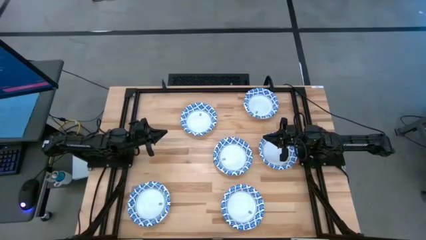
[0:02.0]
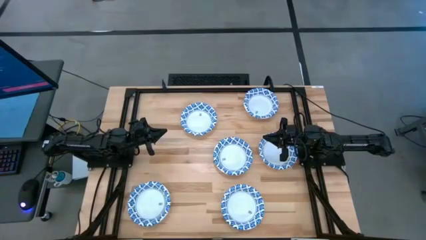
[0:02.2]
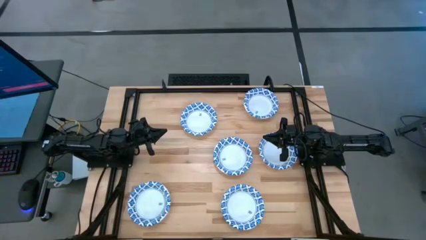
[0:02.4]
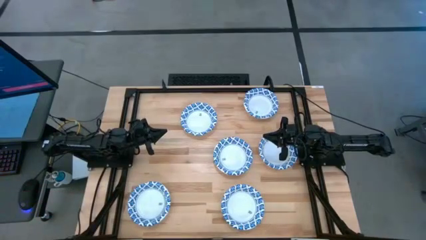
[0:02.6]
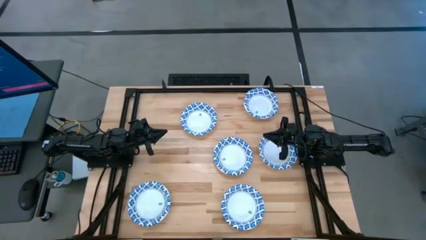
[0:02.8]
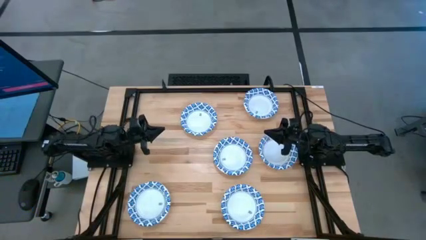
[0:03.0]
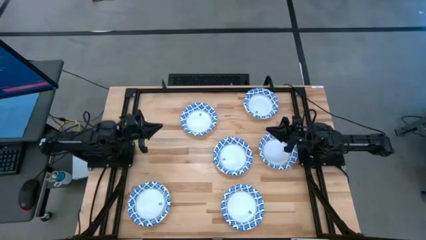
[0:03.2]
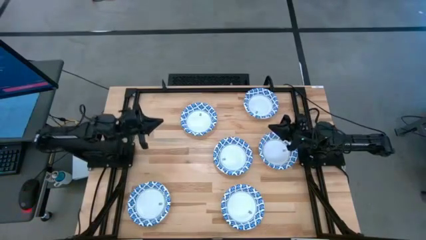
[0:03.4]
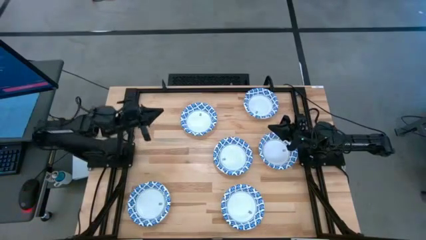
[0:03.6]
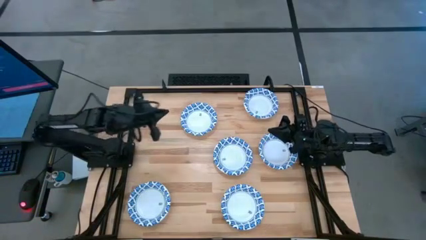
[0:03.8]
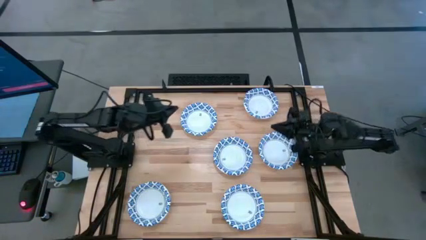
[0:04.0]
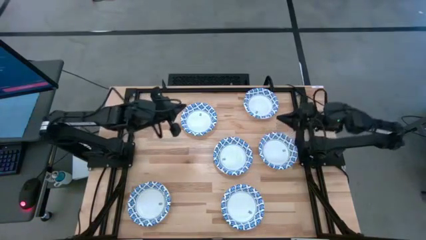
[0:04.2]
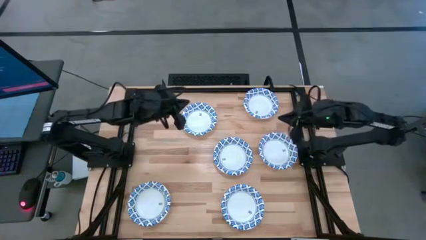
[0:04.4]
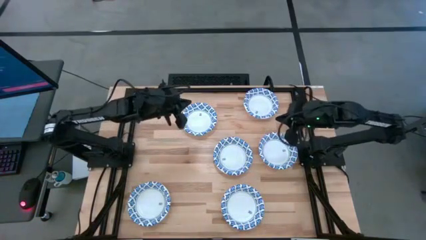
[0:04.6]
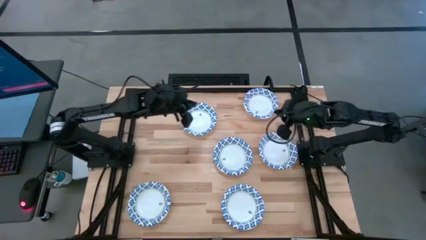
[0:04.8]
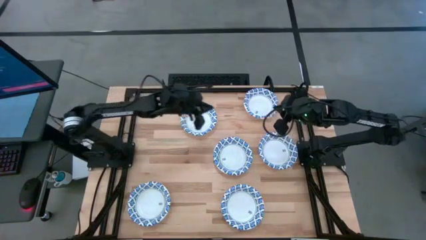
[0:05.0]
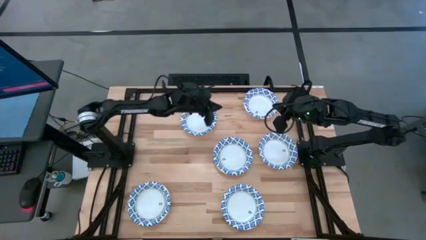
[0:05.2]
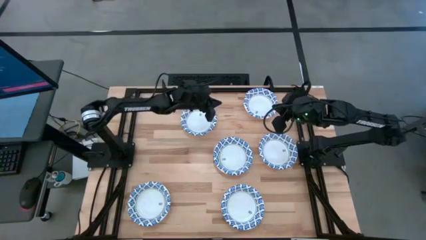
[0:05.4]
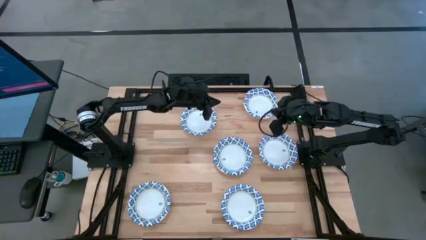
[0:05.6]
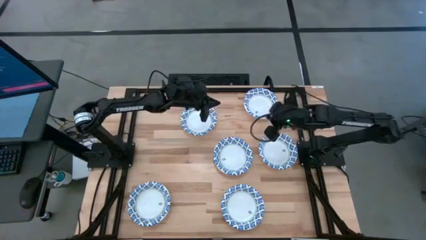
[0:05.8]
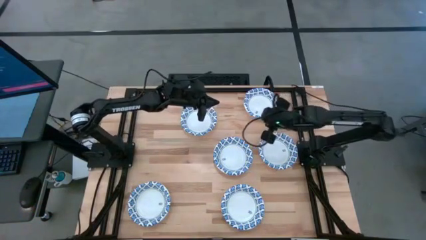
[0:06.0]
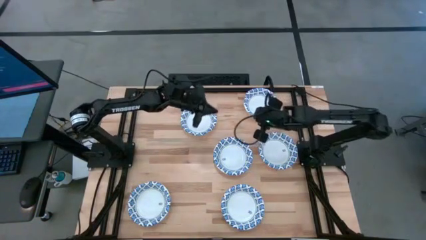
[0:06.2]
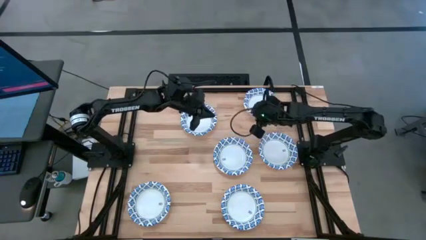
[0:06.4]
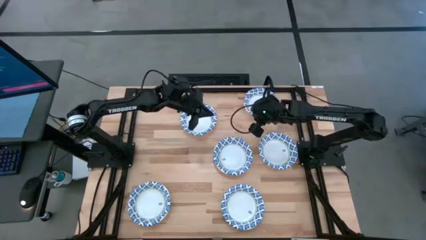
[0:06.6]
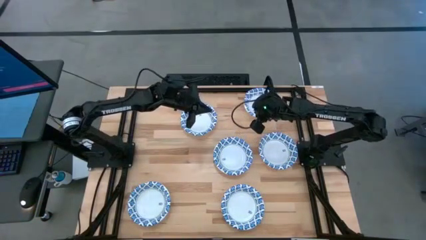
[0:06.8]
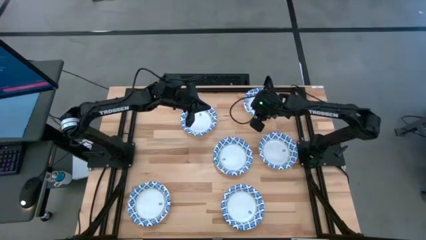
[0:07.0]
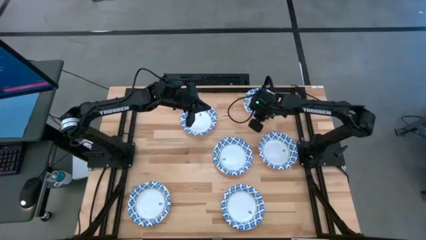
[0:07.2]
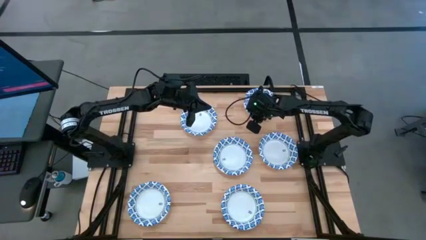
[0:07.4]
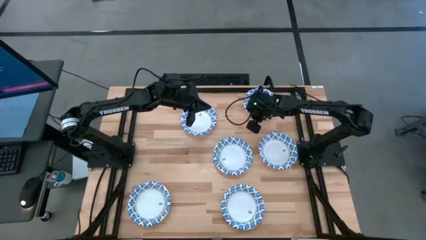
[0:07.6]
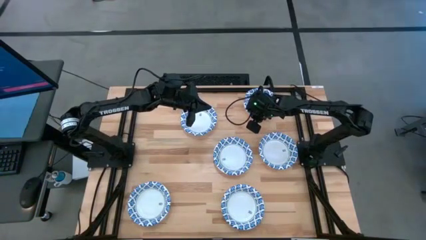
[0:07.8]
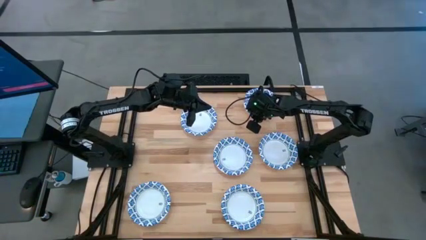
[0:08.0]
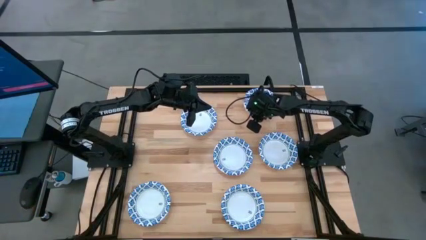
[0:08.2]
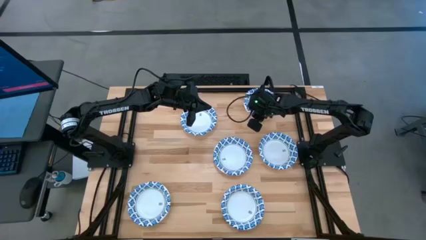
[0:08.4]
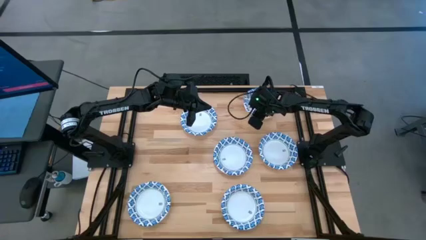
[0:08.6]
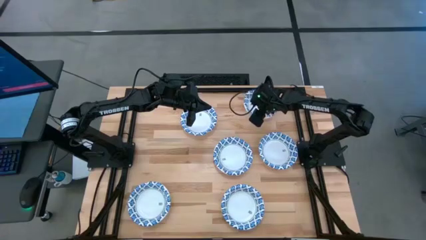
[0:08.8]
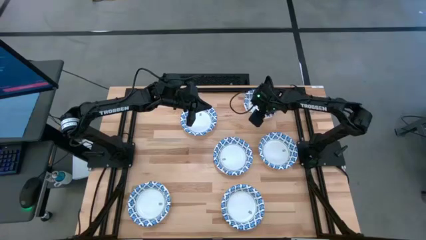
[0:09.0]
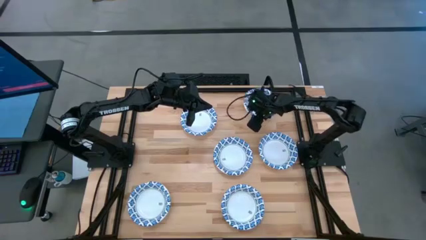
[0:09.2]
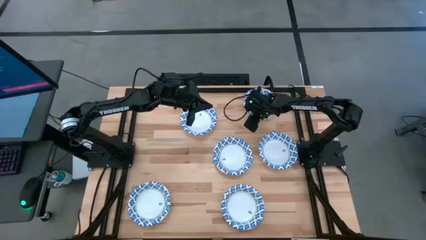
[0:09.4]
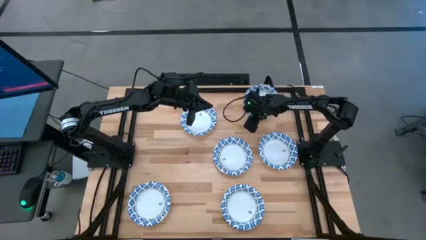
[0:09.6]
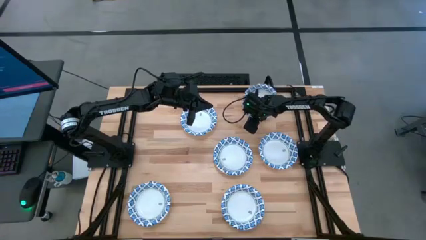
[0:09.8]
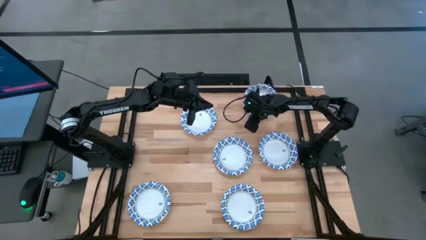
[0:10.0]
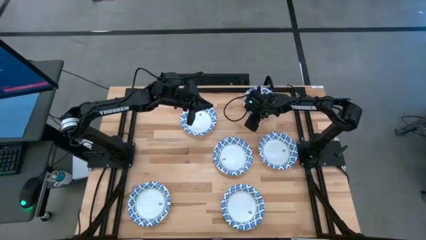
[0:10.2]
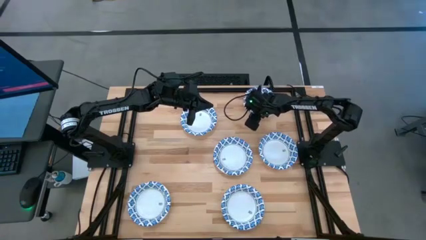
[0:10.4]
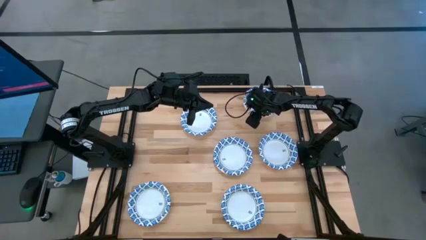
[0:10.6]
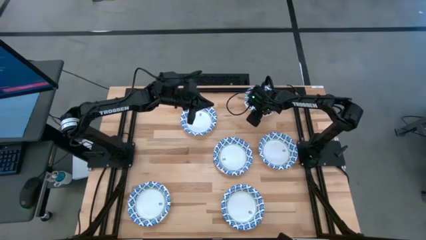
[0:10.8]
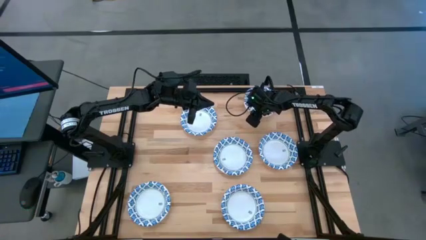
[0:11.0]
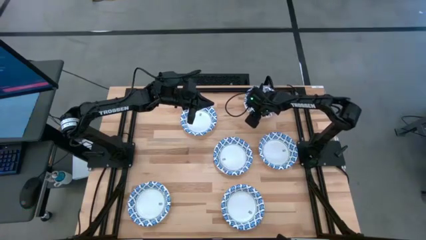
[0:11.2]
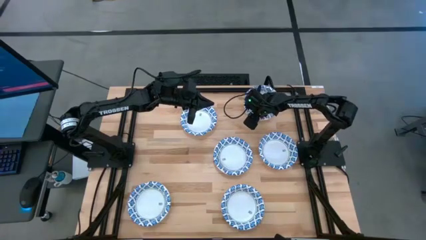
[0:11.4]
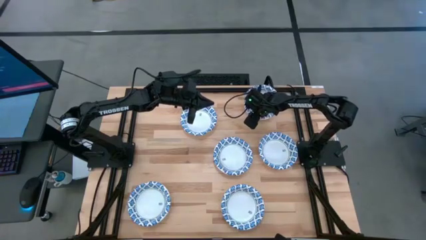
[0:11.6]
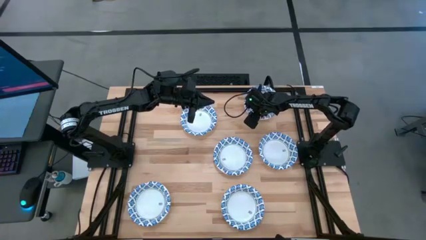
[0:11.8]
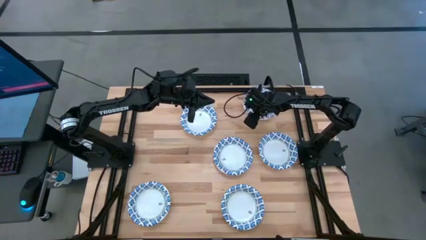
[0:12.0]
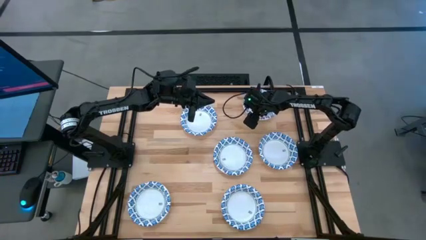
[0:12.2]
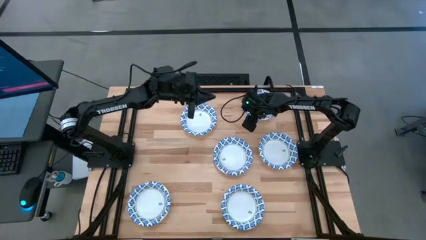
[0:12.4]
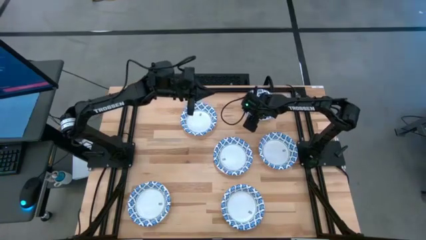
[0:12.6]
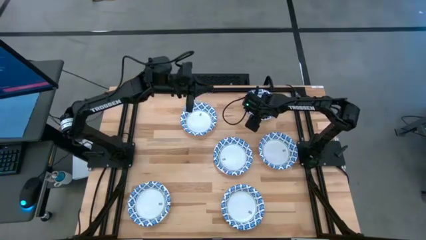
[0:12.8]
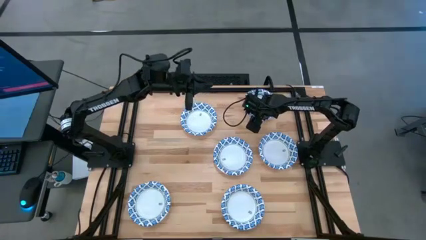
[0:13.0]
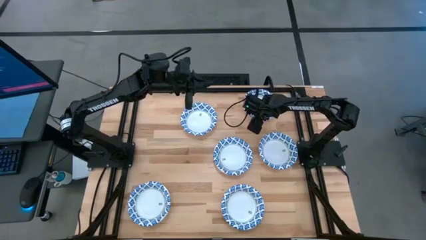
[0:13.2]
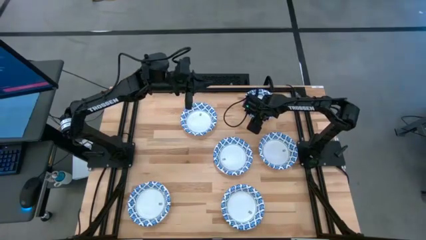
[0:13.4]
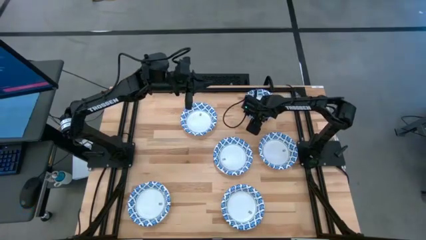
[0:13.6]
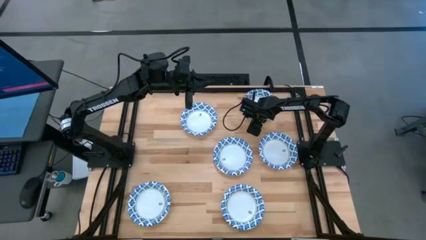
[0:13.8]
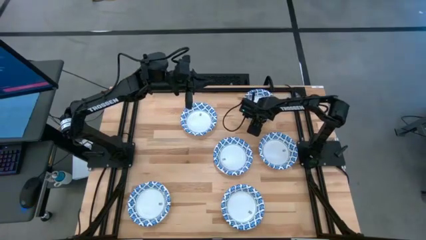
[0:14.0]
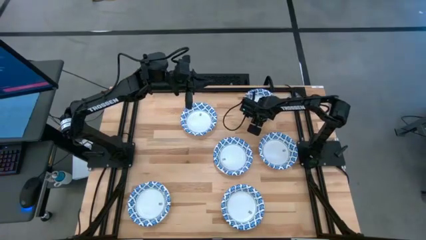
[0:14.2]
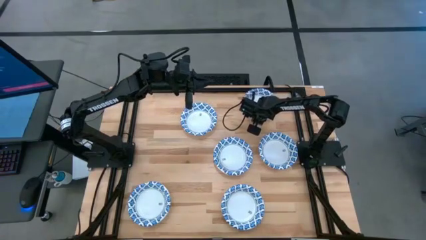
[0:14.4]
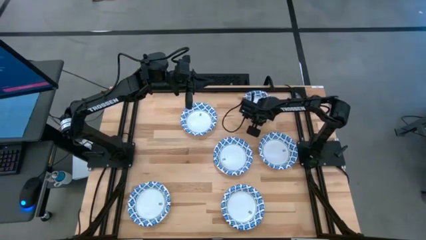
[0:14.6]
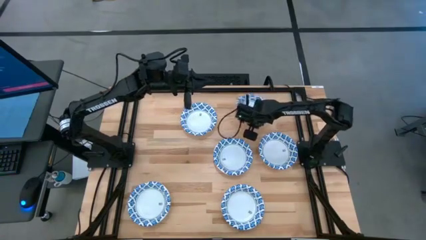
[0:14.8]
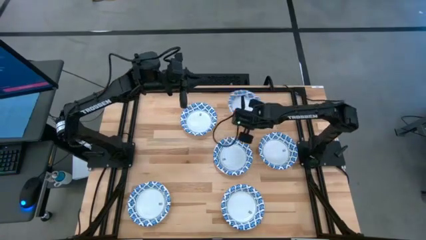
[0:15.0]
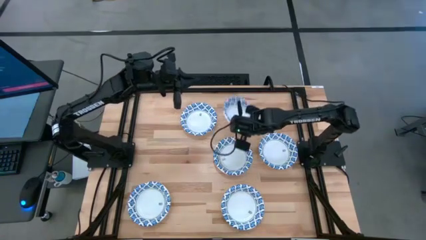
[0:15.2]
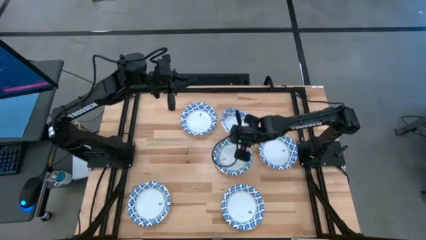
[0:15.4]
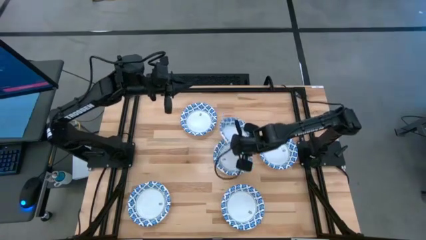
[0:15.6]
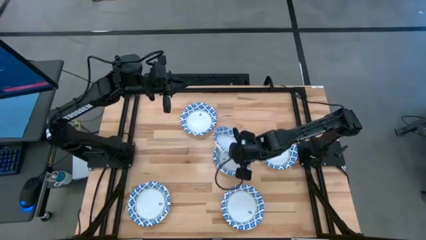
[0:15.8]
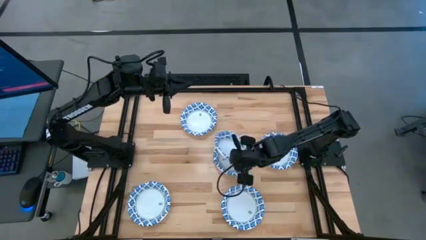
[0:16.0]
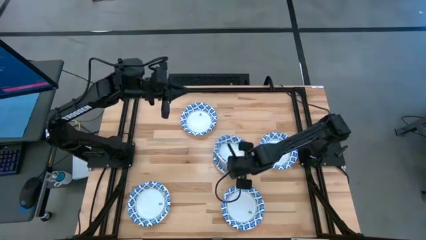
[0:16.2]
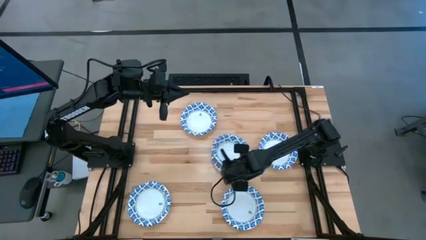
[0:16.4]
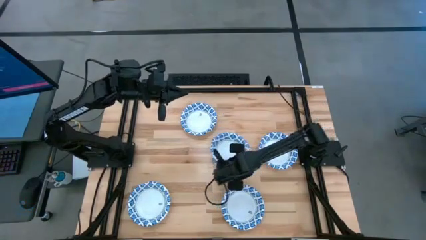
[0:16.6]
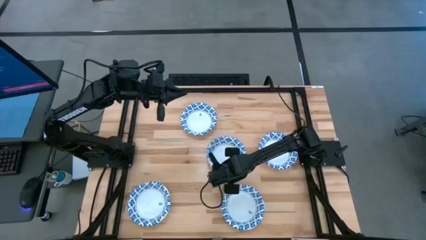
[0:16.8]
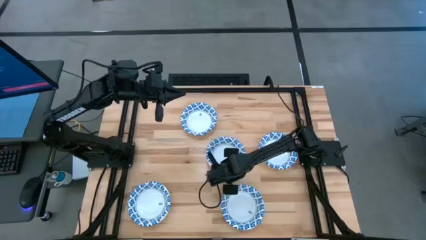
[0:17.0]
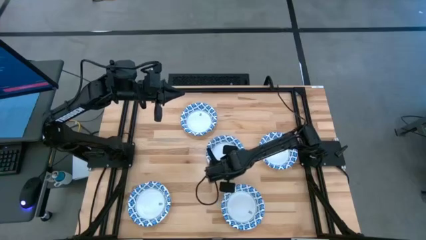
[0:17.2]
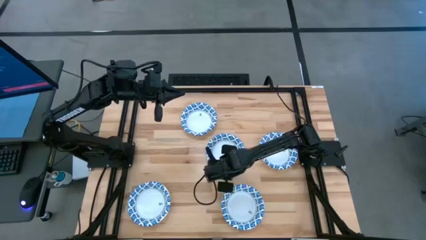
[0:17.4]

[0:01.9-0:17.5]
Task: Nest bowls inside each other
Stack the white bowl on top of the other white bowl
